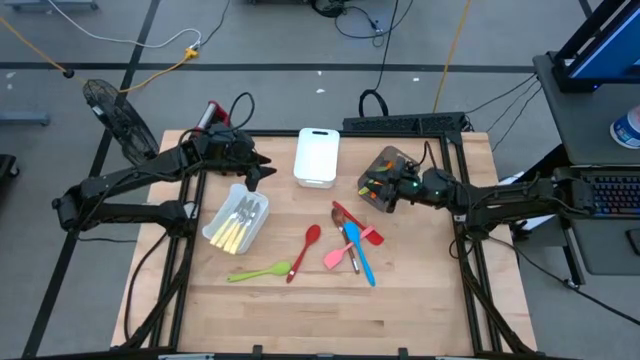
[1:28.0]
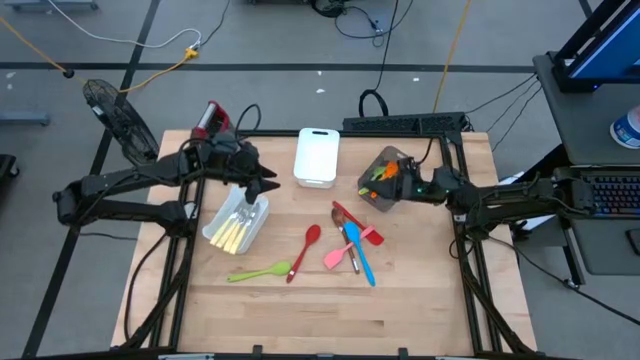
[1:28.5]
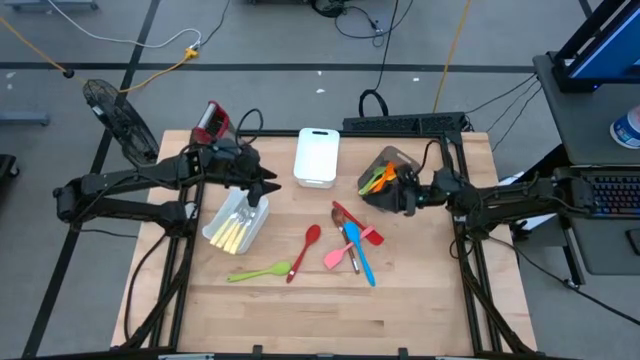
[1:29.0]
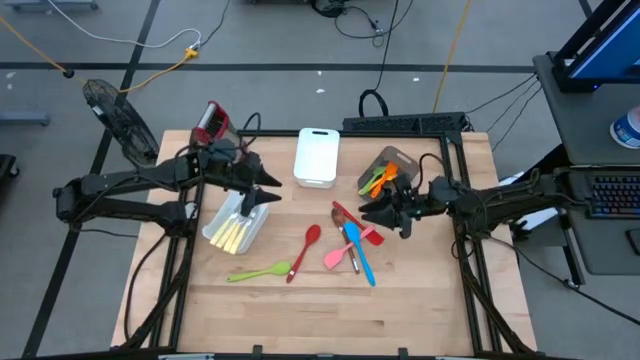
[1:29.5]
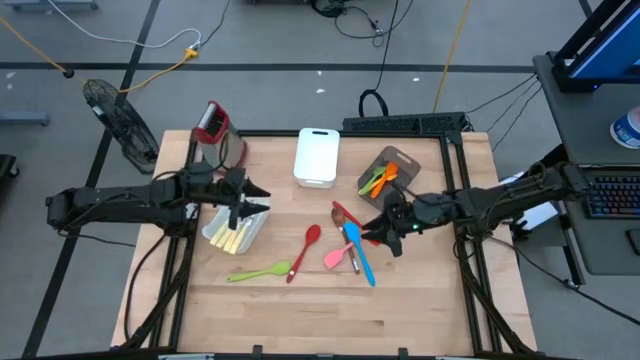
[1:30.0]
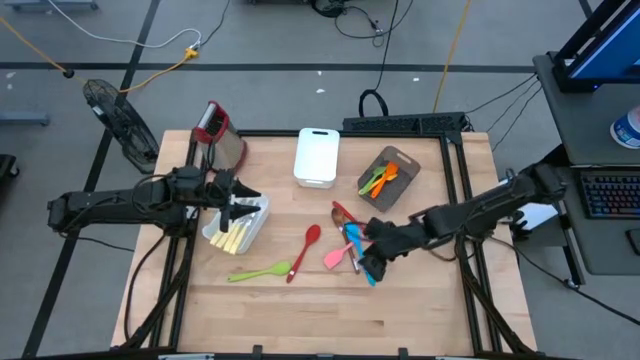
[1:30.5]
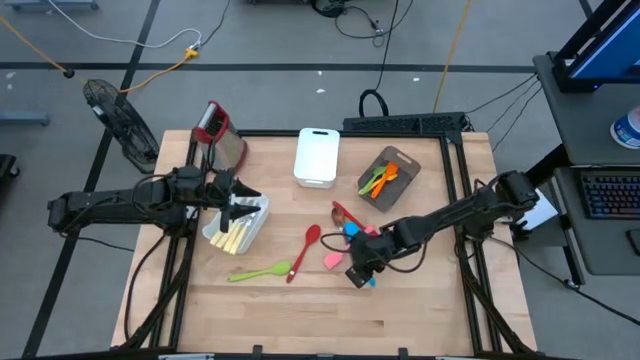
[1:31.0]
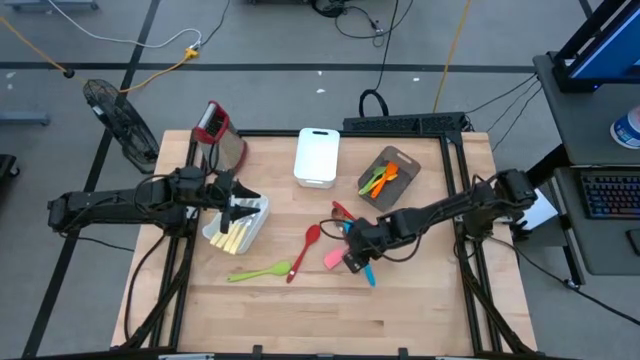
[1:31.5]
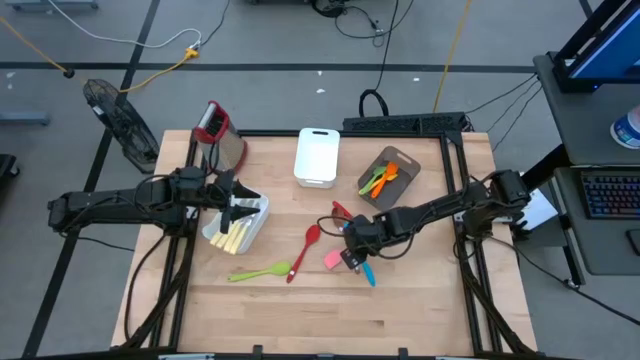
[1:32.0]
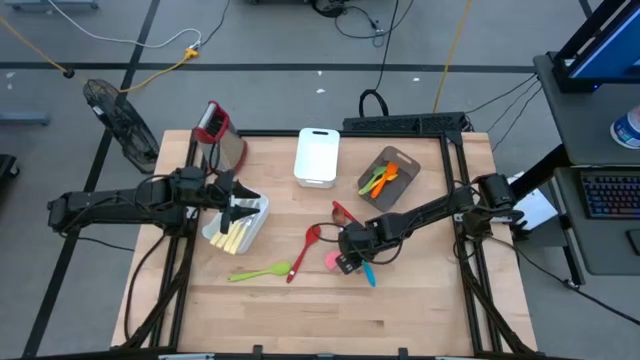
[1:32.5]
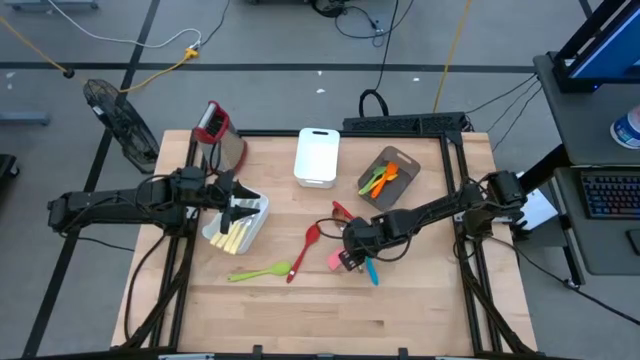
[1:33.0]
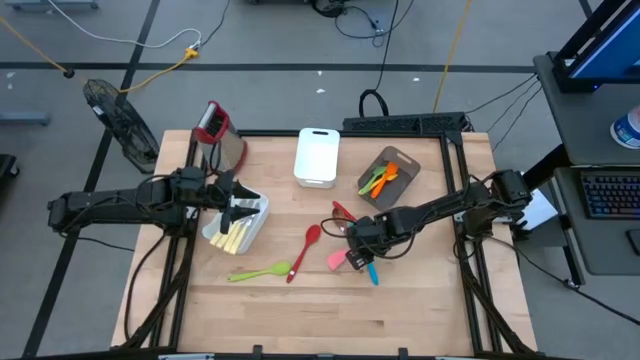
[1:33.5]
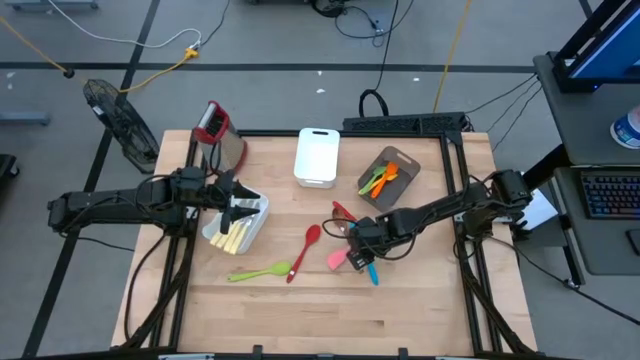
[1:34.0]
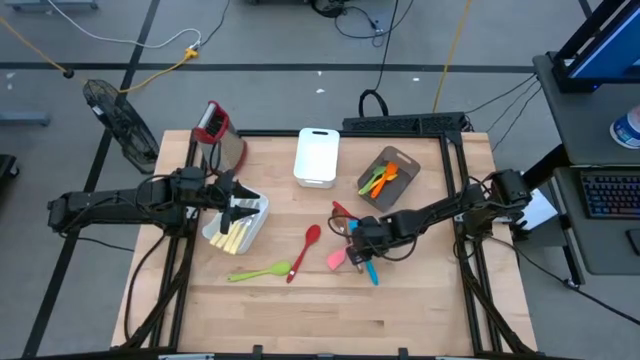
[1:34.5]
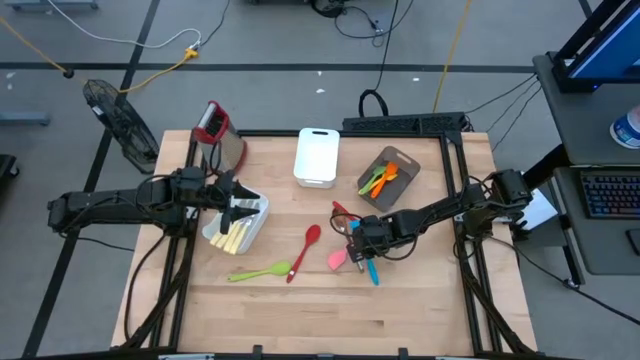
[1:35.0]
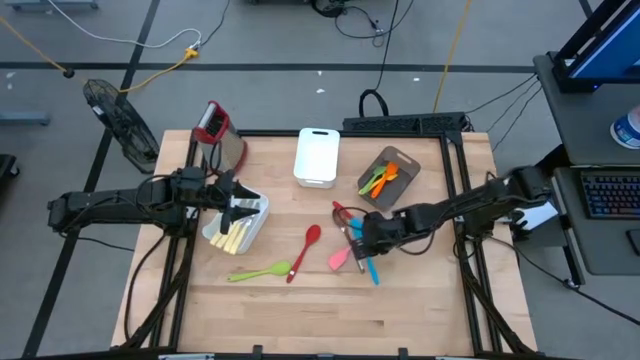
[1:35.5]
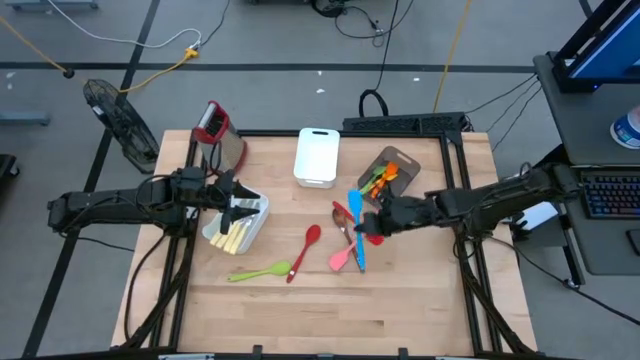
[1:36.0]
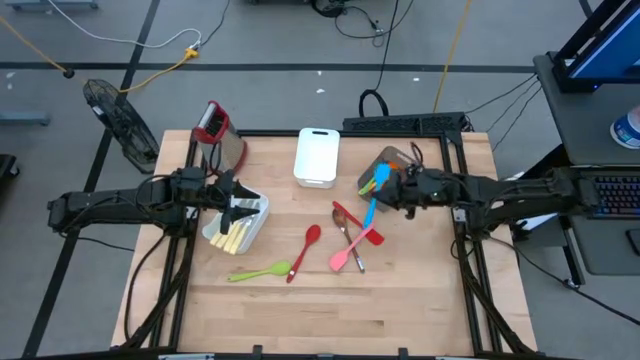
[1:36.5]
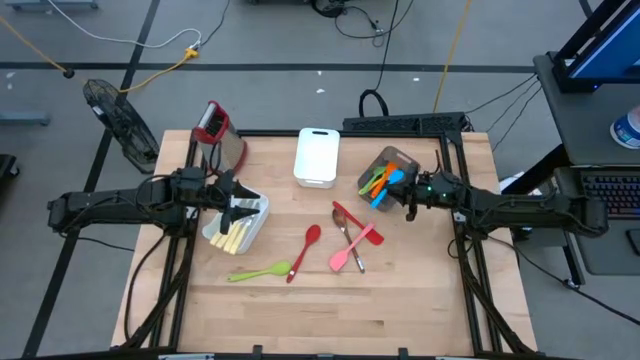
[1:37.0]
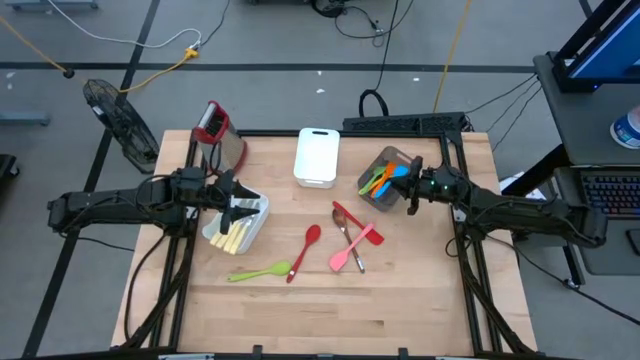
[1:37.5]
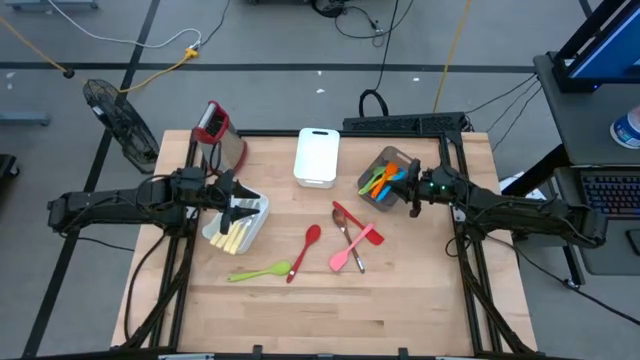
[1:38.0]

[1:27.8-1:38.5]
Task: Pick & Place Kitchen Items
Put the blue spatula into the black bin

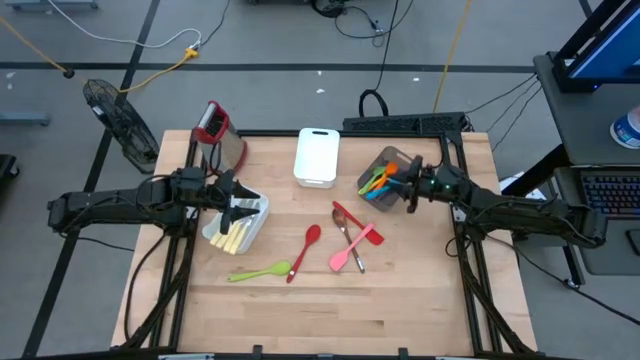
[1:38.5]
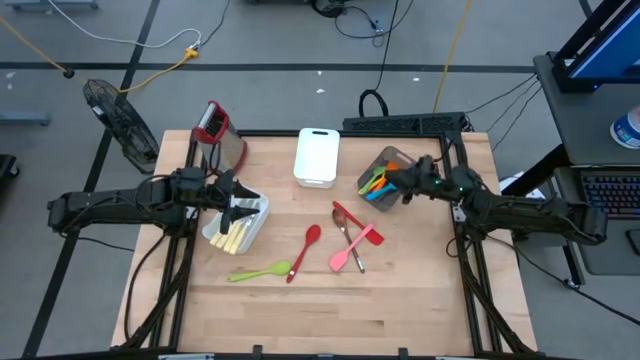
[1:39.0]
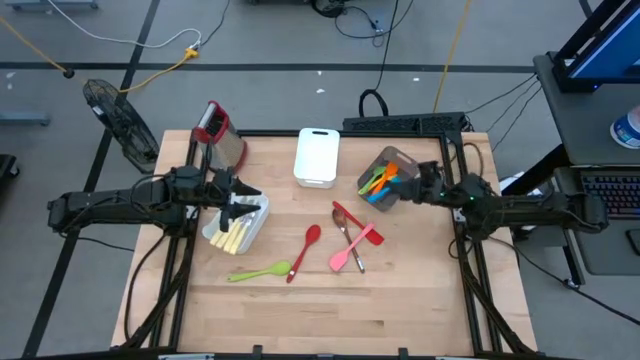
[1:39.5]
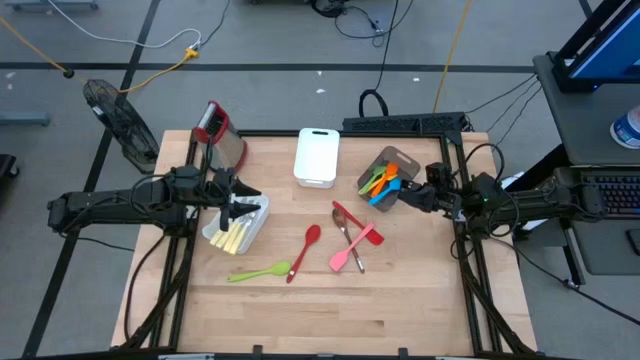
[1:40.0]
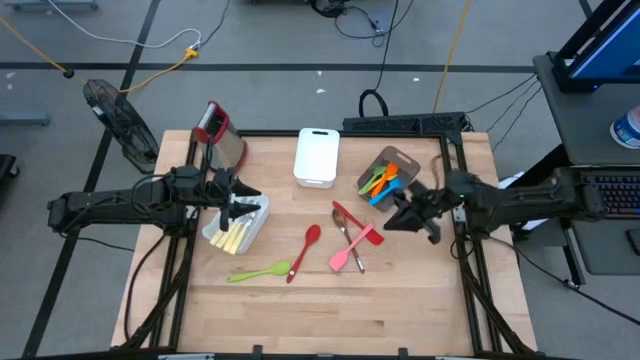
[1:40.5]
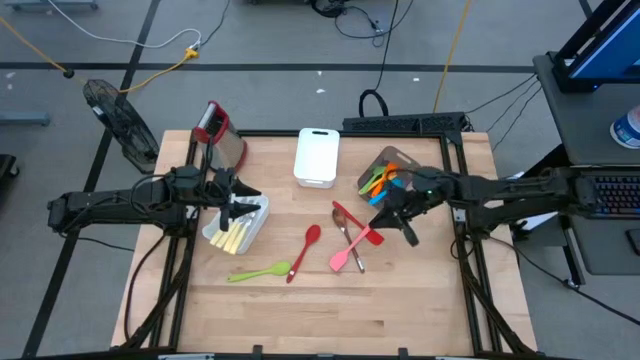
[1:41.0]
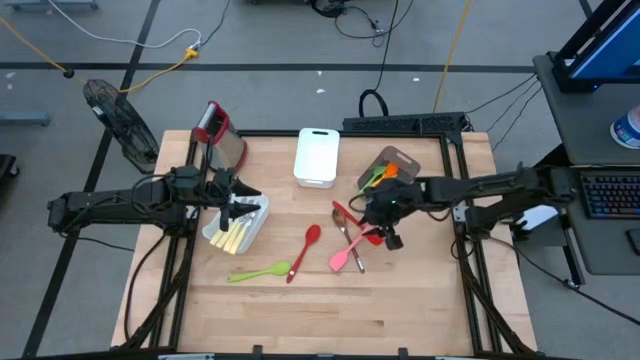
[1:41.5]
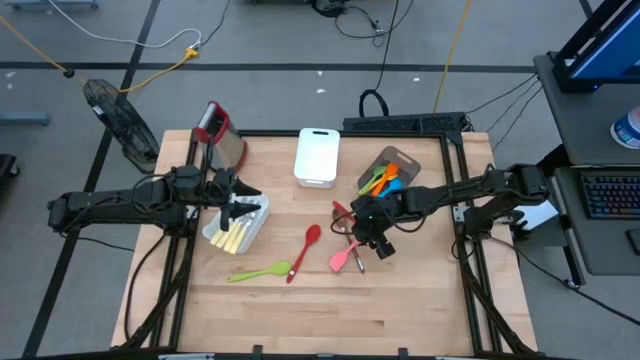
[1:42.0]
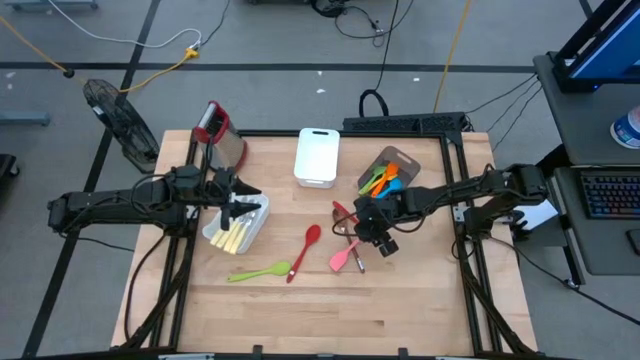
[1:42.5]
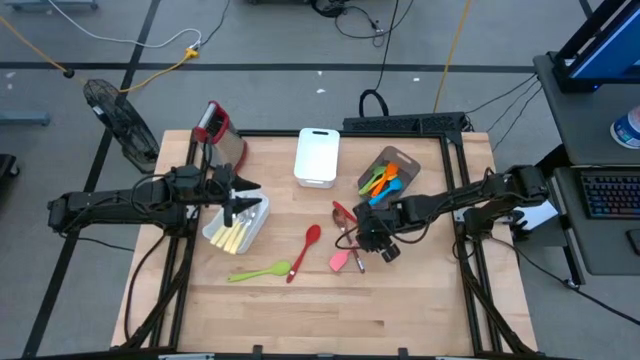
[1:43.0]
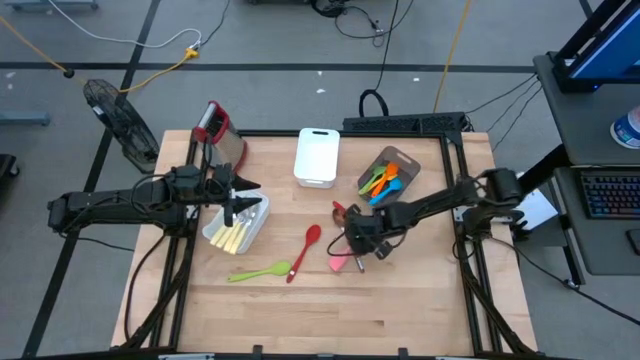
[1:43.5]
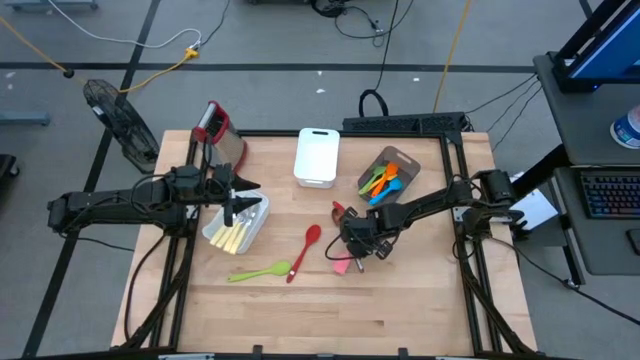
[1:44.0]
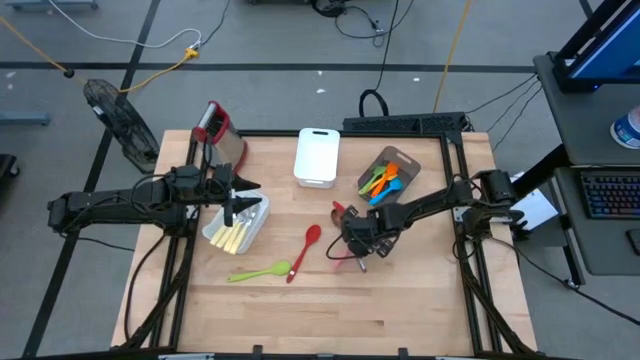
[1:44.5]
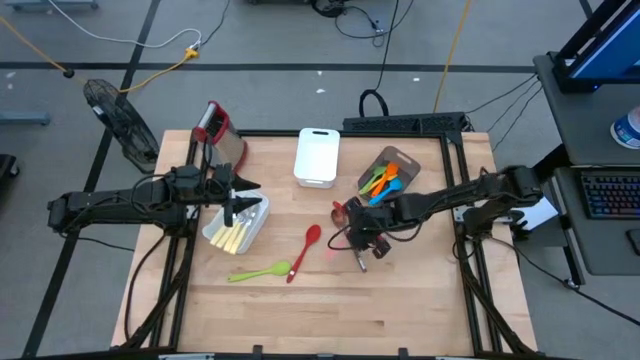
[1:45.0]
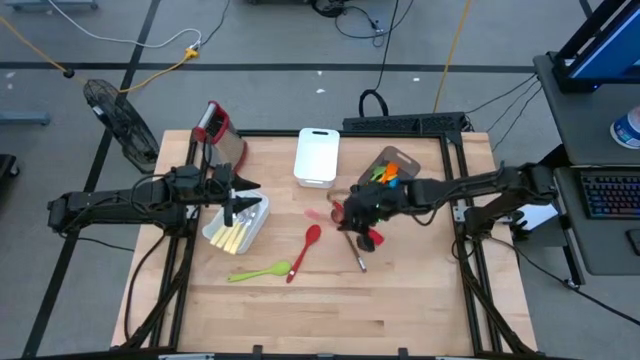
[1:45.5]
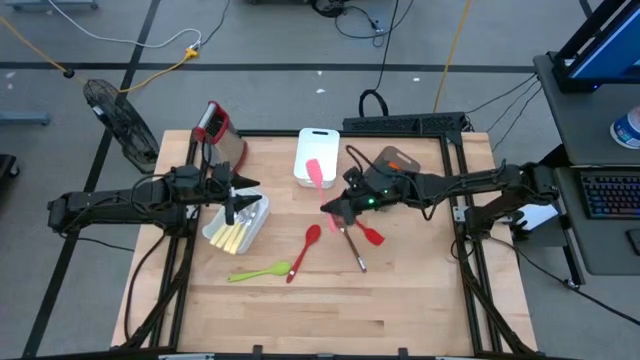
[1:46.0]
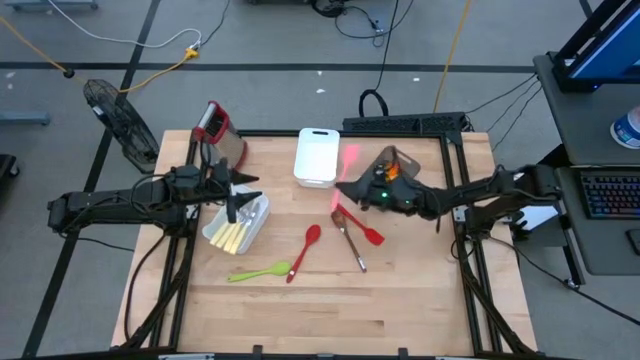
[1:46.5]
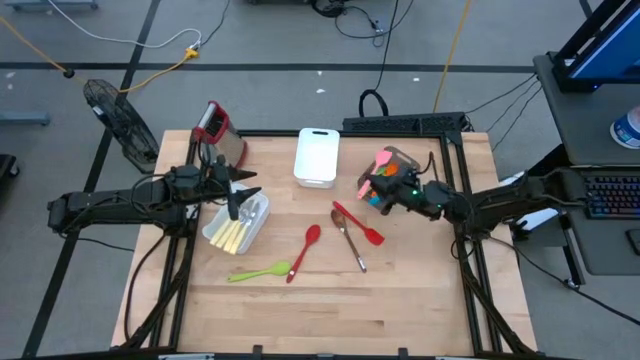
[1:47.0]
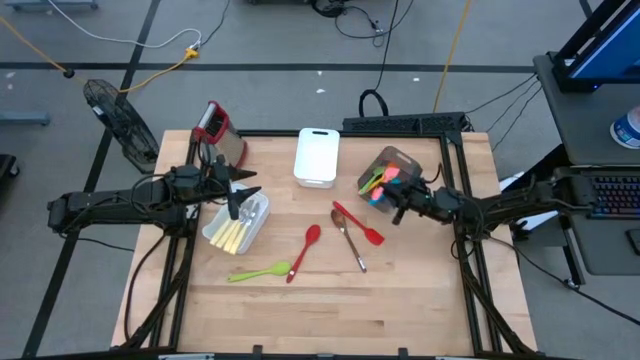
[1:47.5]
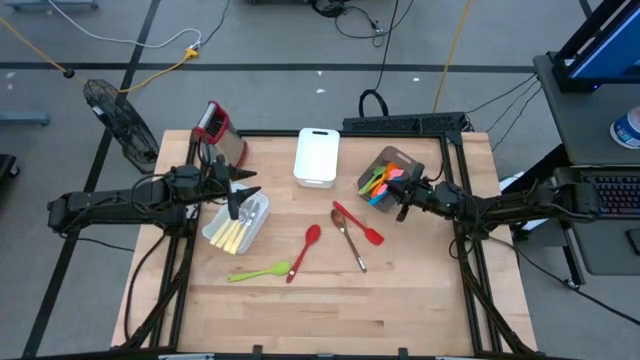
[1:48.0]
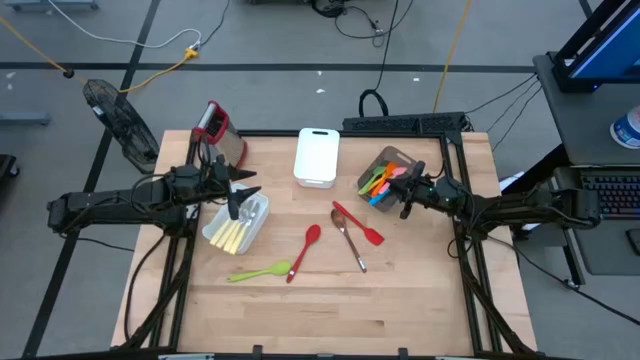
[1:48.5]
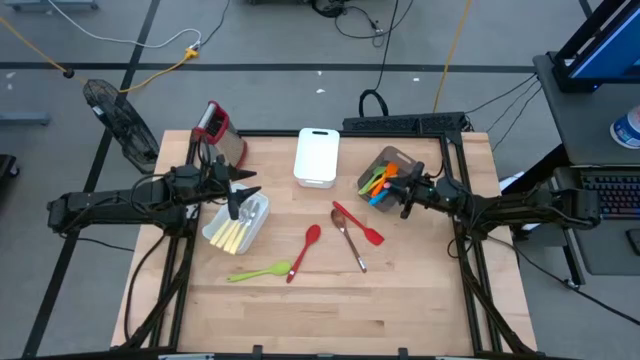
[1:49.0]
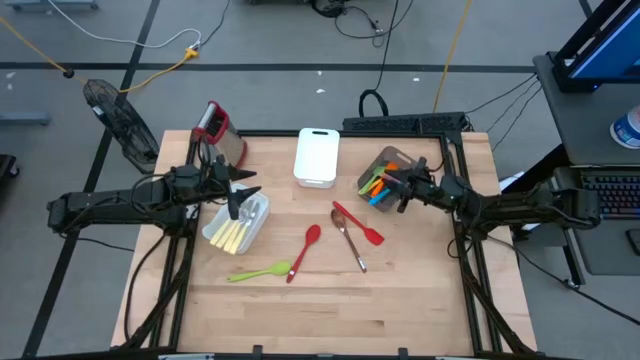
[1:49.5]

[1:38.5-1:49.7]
Put the pink spatula into the black bin
